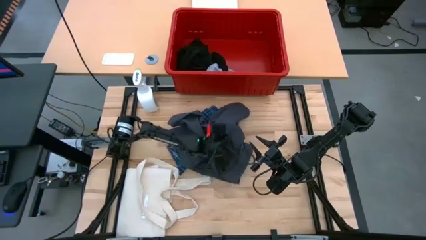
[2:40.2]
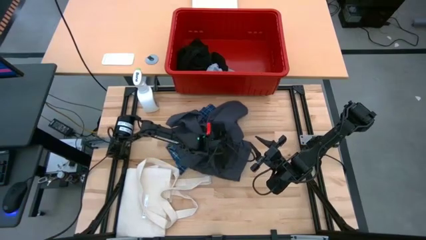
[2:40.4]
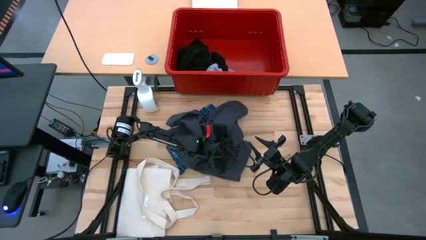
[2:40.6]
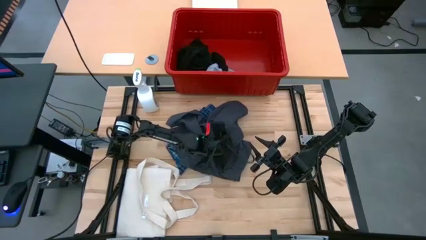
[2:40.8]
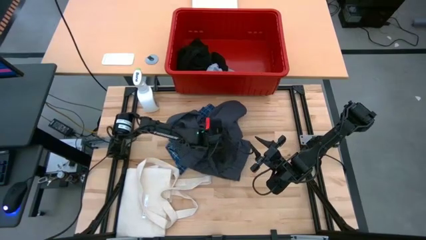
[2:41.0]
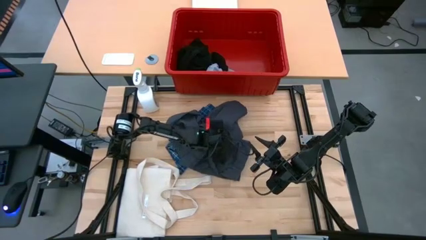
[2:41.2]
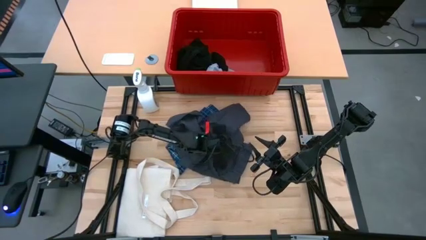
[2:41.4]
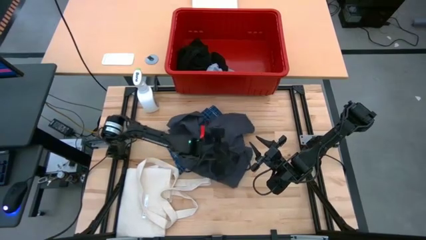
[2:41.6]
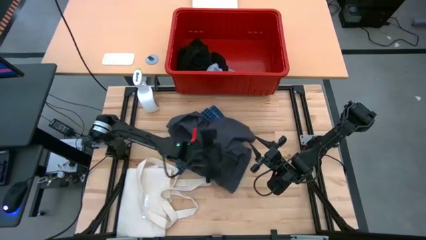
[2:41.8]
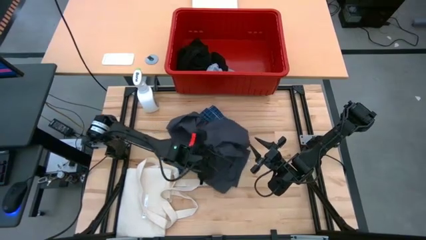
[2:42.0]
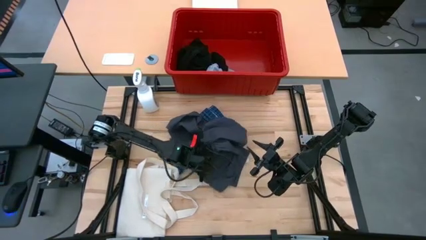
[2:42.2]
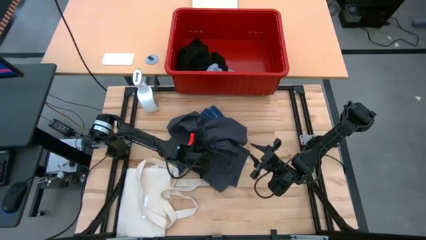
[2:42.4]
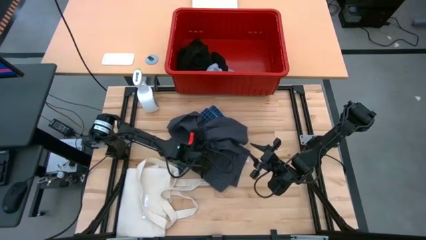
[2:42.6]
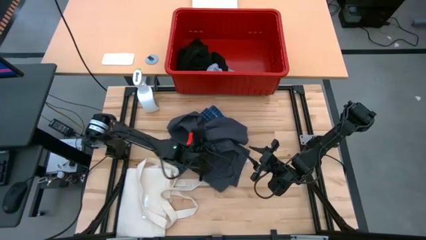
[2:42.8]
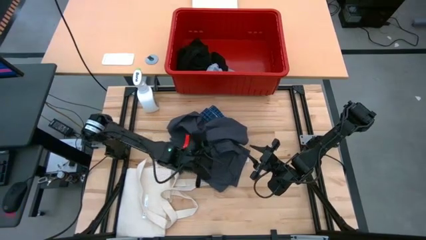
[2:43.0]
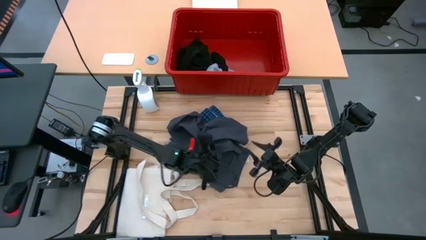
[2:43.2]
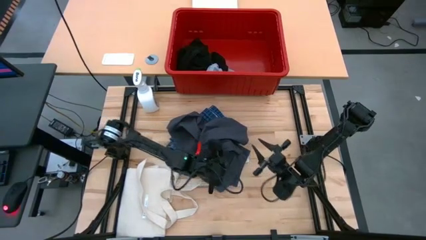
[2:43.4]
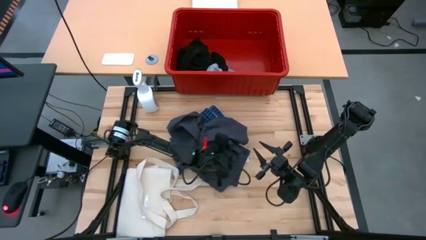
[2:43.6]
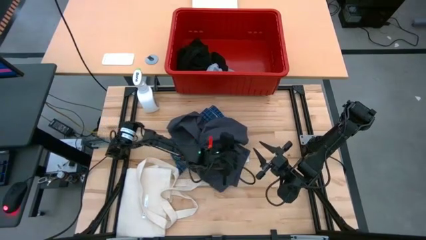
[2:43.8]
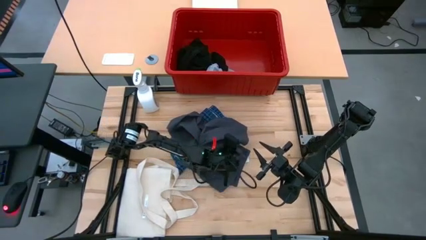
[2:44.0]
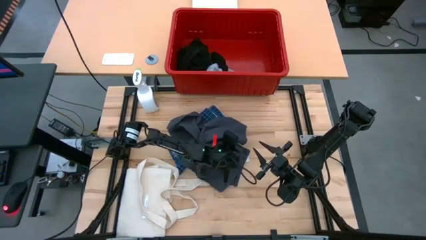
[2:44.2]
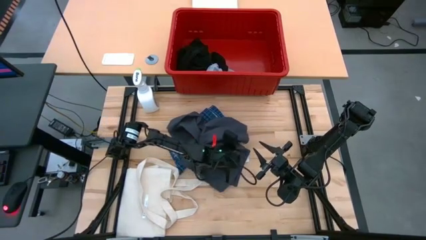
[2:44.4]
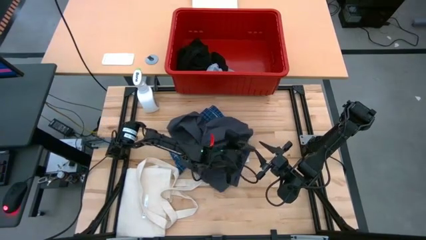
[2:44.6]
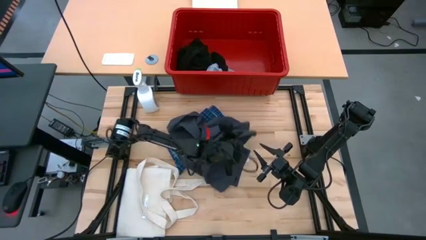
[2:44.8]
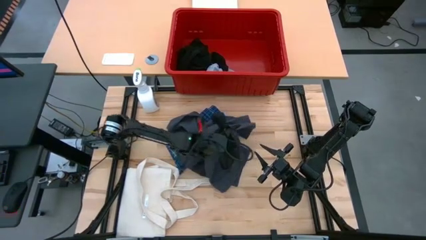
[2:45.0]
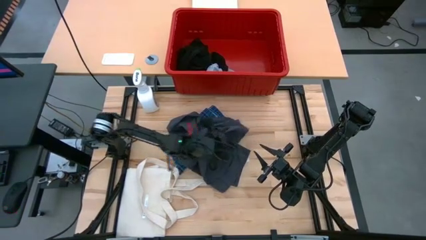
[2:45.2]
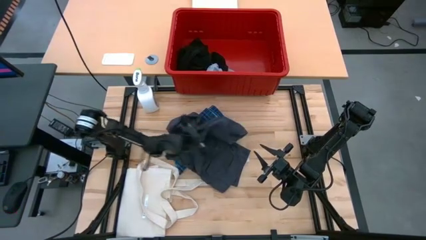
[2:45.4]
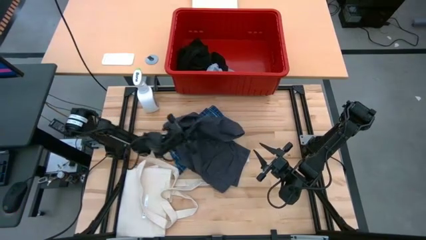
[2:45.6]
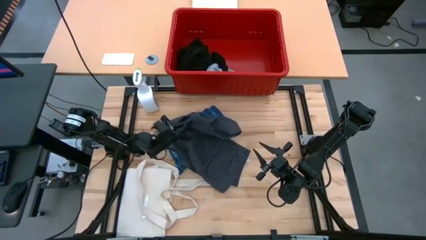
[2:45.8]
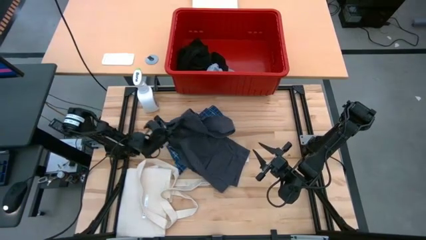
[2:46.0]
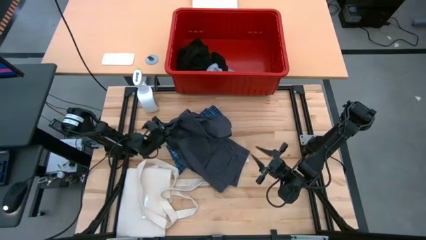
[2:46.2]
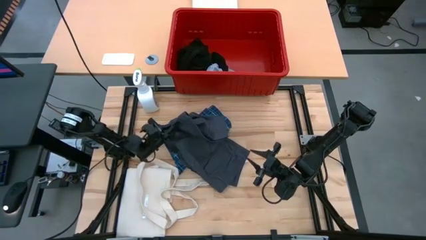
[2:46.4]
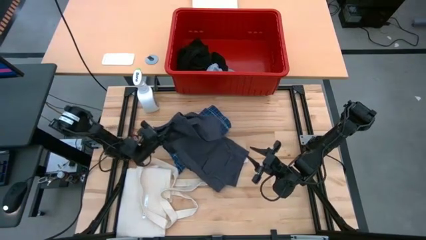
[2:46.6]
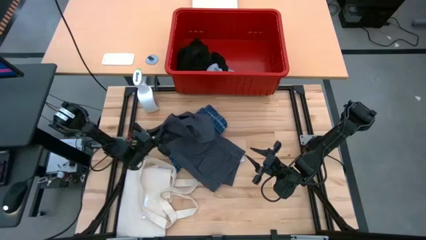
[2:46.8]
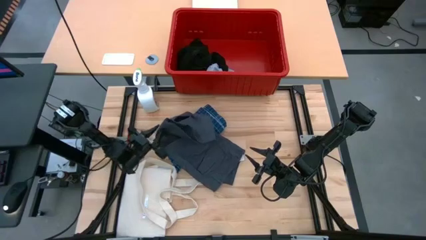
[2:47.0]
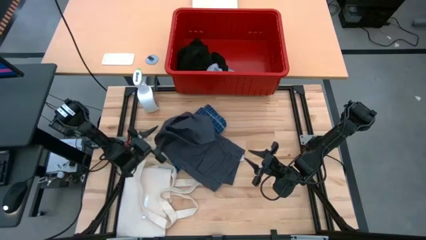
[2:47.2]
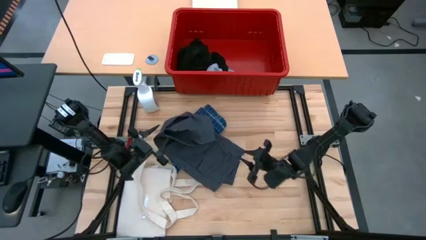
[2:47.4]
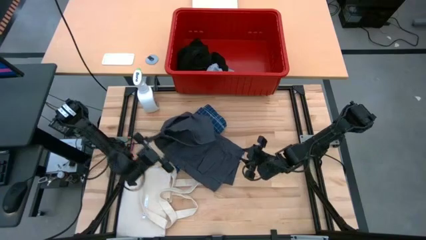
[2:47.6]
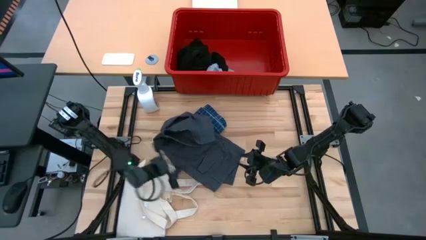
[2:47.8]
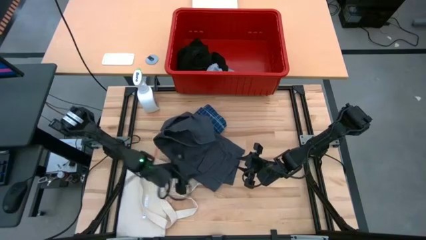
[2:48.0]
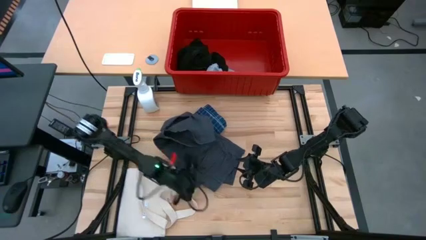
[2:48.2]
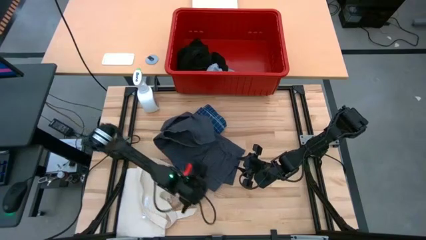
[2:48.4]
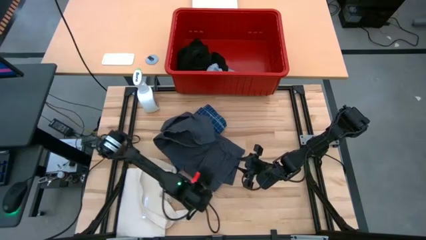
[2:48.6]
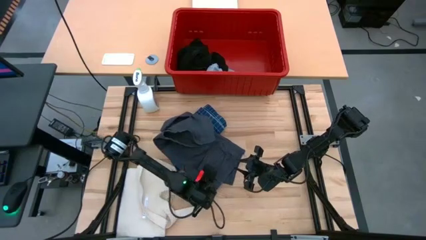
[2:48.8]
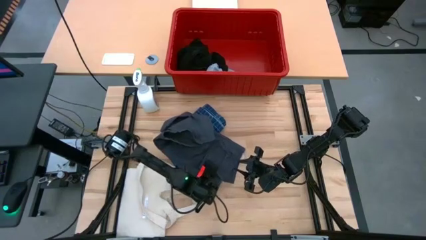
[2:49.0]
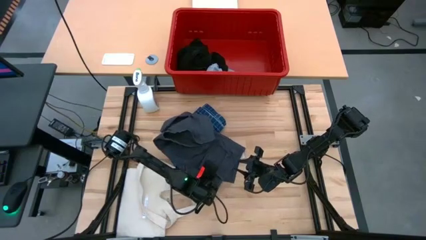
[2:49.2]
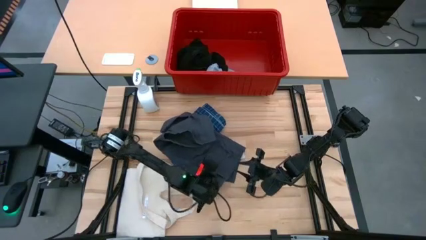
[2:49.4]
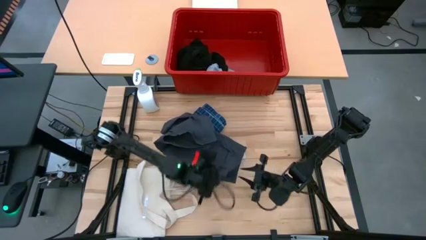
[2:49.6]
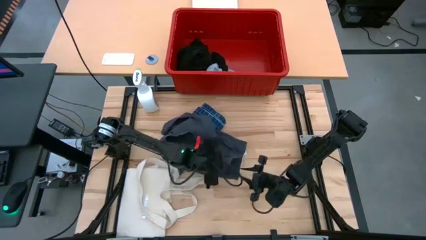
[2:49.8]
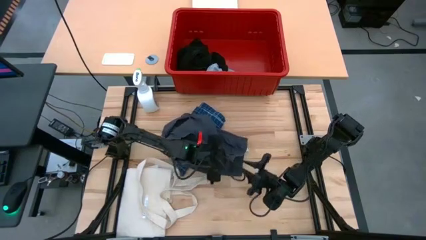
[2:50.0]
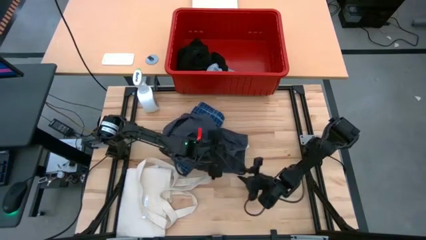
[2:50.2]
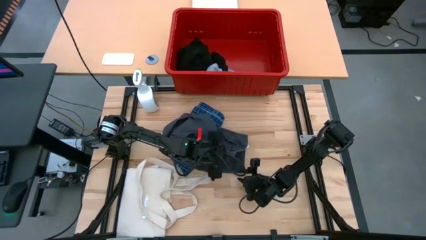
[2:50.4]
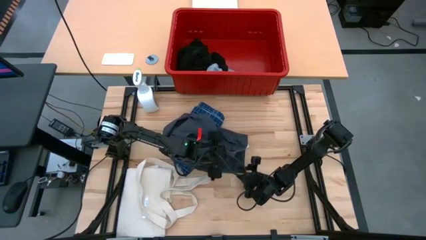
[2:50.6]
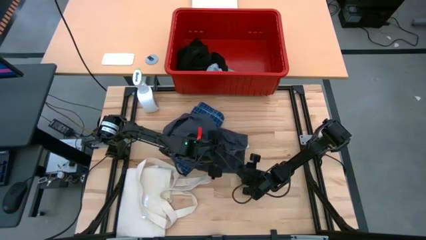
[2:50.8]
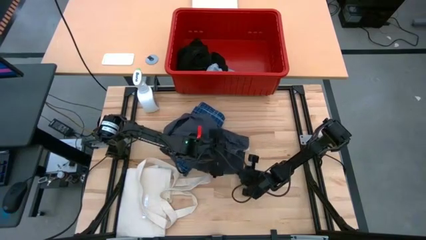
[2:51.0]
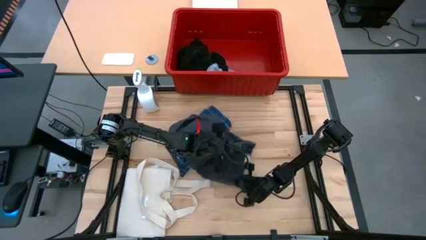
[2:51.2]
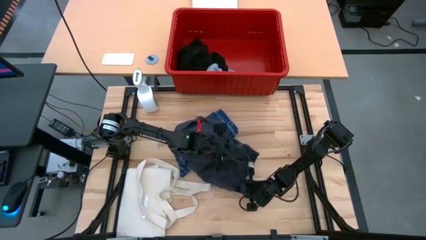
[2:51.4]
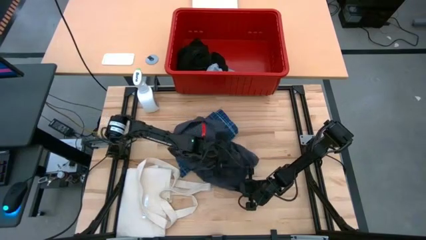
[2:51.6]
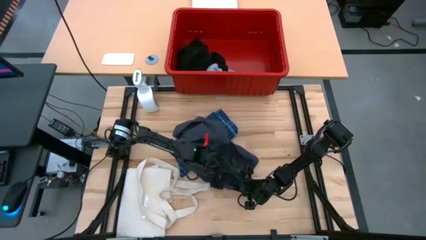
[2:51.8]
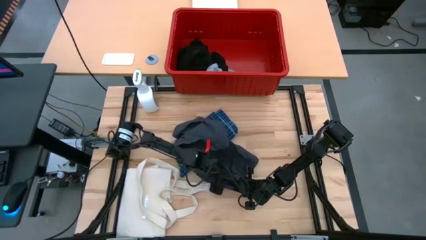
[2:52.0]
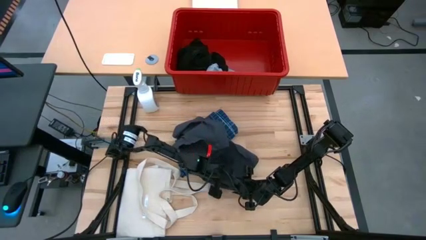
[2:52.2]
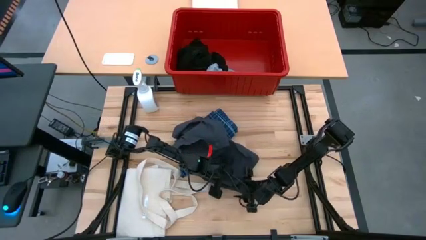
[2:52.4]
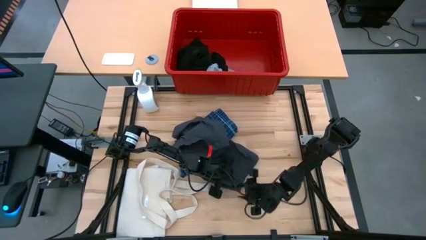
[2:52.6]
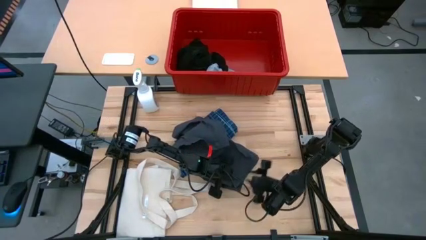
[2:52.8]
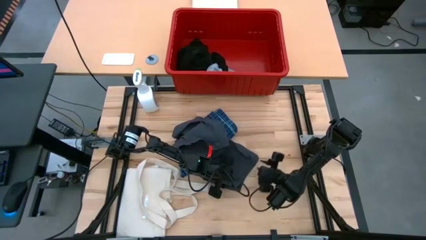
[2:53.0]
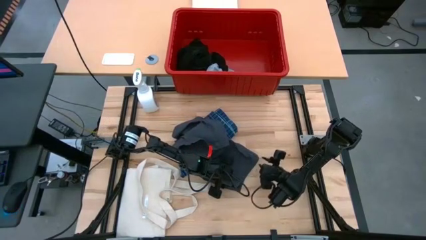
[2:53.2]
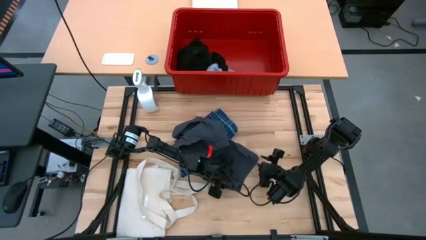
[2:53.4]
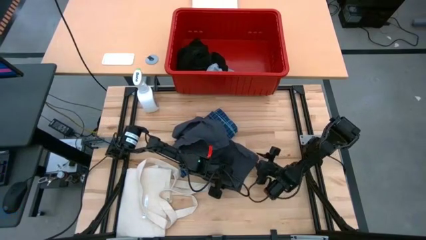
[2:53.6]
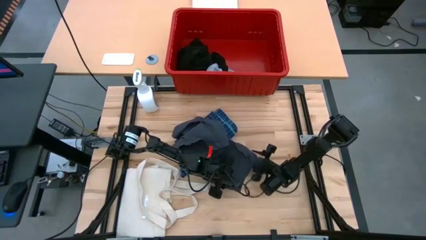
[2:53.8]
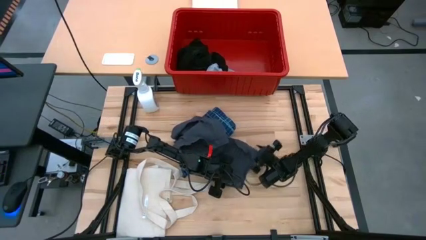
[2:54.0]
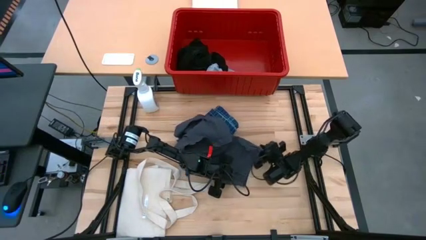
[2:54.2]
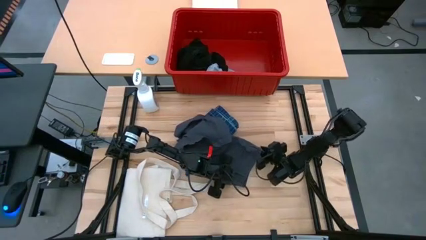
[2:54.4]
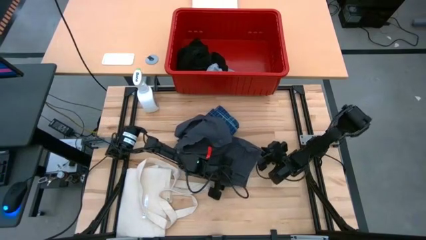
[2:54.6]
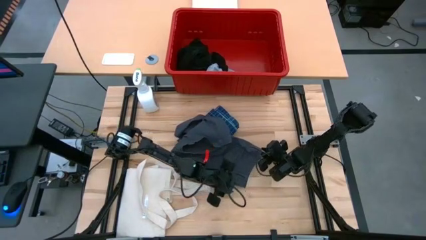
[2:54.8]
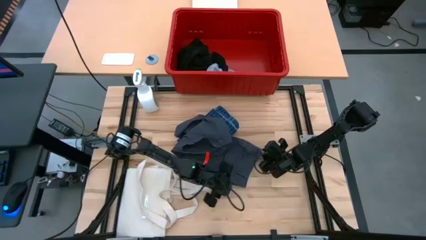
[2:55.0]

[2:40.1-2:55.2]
Task: Fold Laundry from Bin
Fold the gray short
